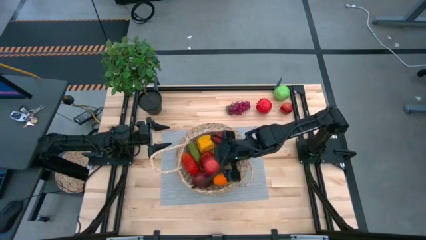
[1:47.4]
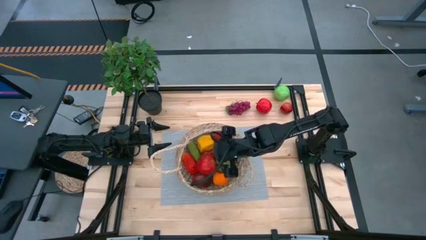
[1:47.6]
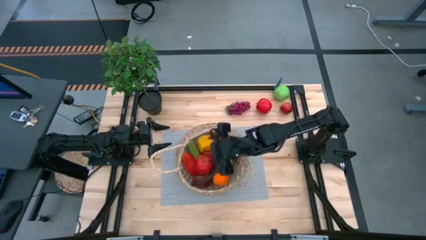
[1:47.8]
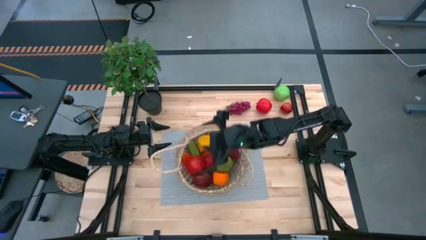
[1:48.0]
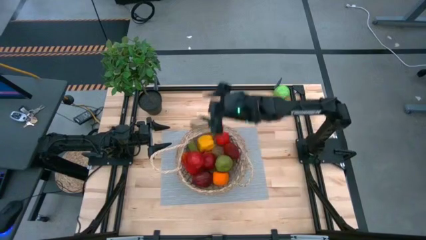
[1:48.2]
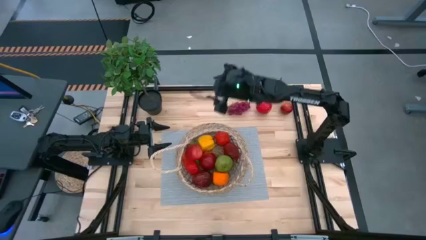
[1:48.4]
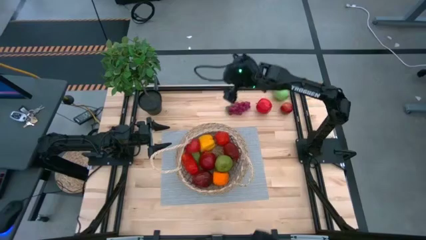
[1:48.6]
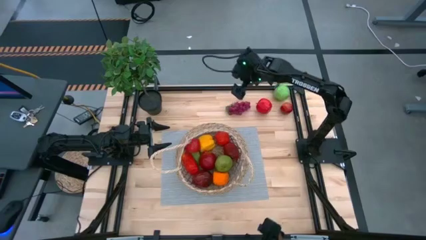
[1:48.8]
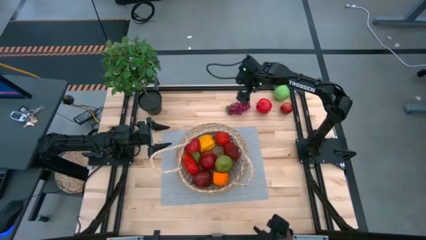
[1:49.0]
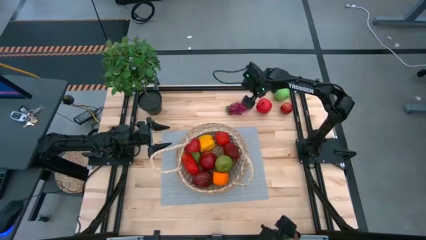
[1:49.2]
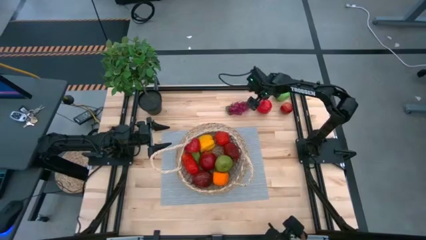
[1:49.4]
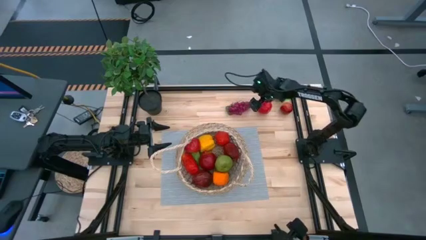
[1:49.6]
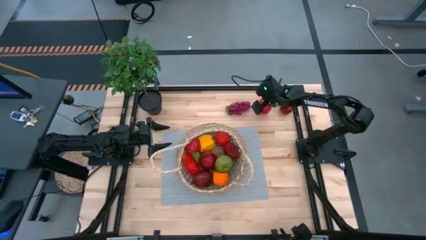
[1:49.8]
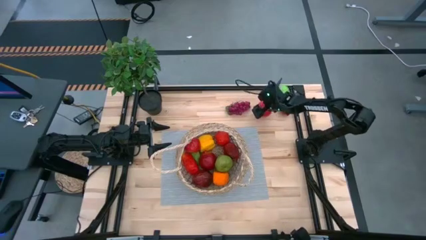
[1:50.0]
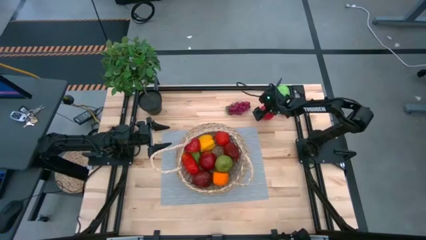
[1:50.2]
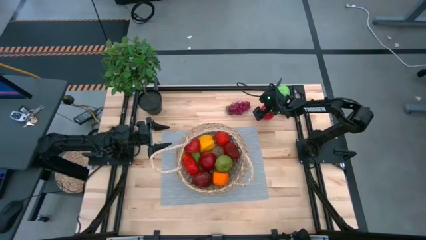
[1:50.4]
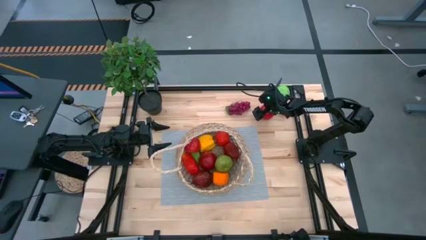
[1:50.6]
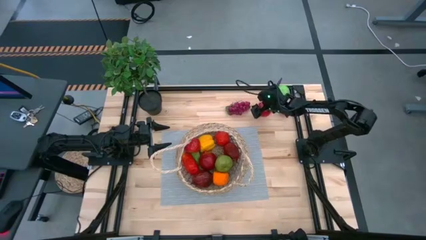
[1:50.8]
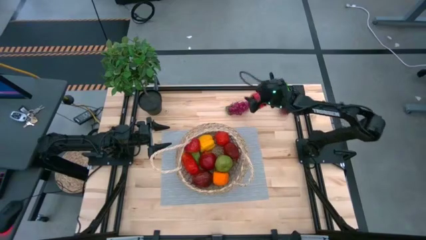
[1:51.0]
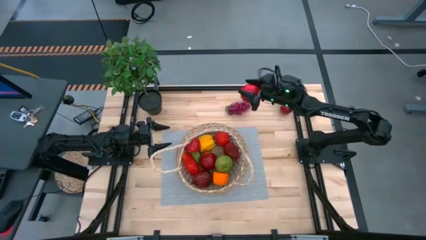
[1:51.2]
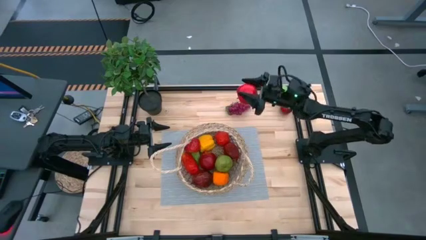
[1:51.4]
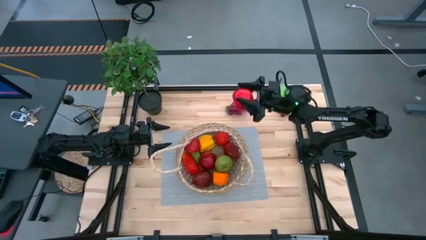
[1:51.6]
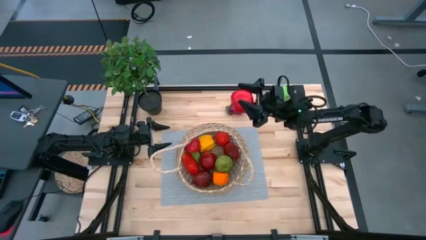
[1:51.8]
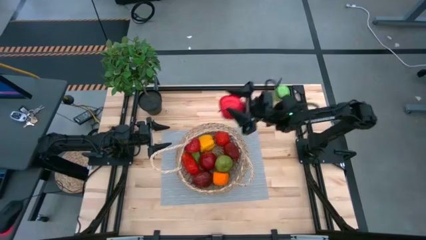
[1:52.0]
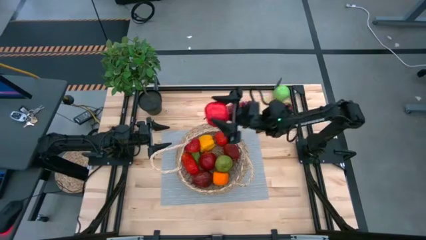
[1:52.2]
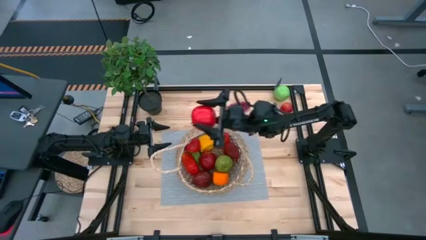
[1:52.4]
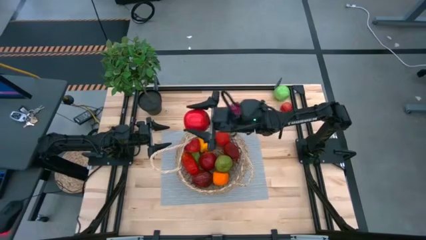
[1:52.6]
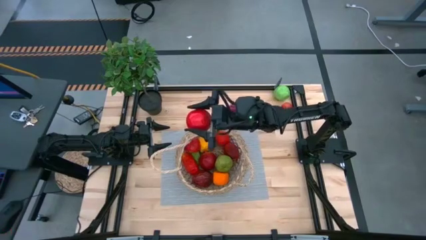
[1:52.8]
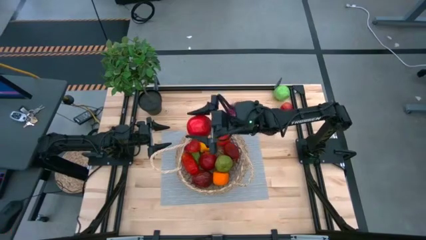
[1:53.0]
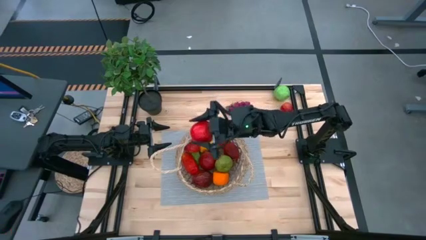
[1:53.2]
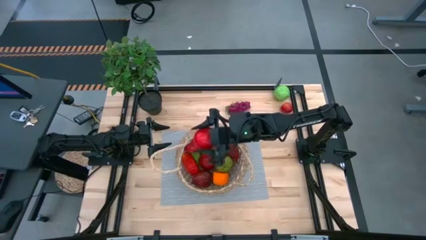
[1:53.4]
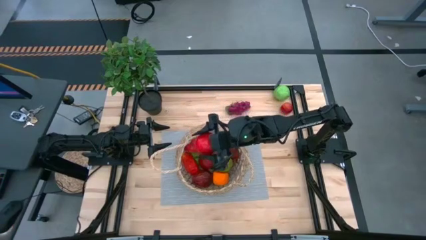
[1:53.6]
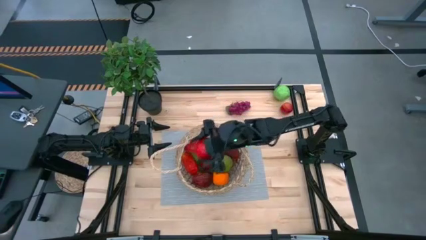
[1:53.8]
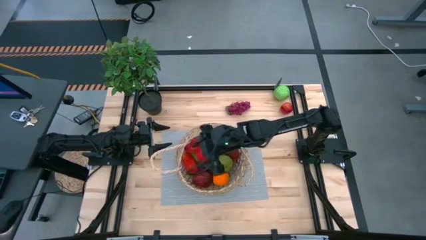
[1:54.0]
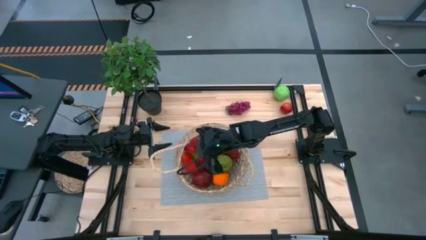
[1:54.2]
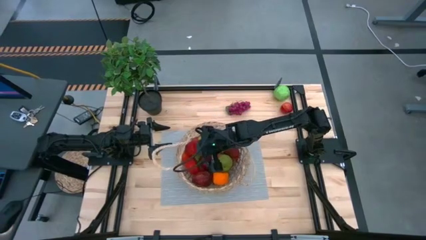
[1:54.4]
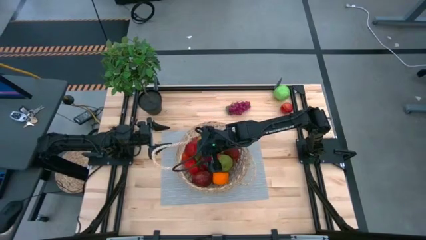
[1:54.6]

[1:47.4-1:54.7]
Task: Build produce basket
Put the left red apple into the basket

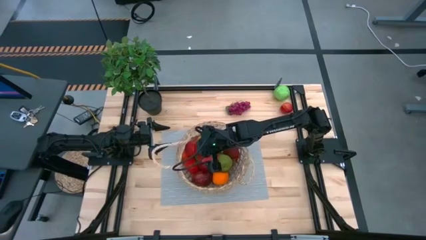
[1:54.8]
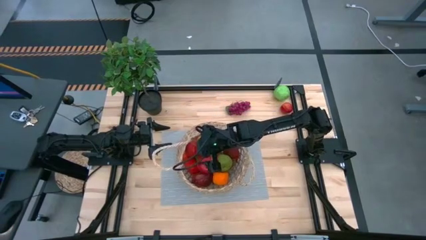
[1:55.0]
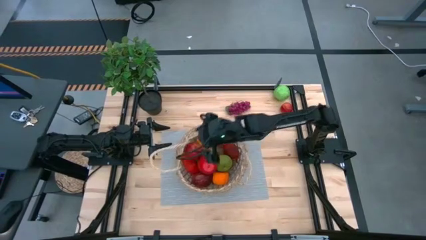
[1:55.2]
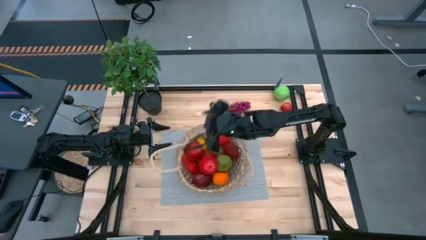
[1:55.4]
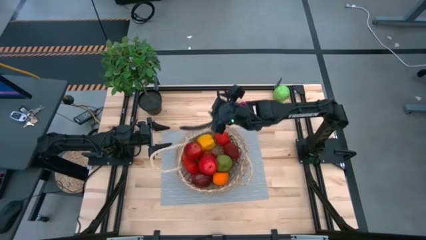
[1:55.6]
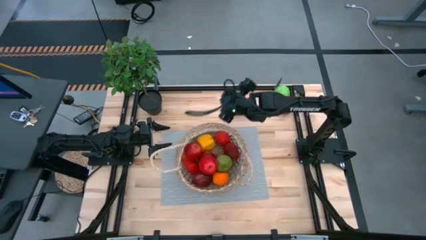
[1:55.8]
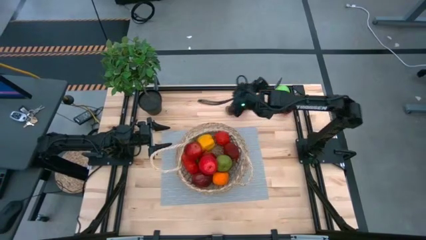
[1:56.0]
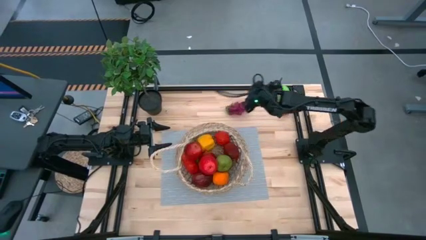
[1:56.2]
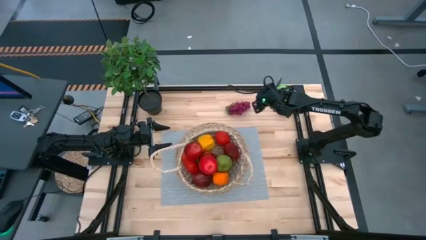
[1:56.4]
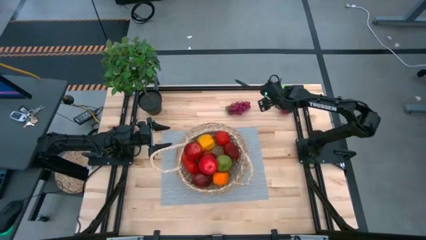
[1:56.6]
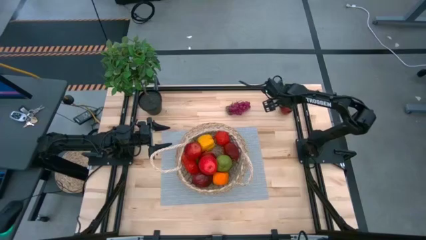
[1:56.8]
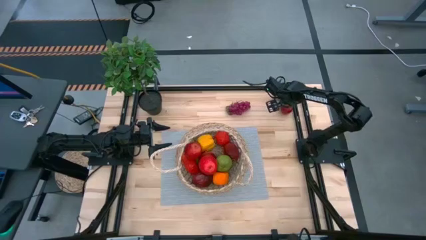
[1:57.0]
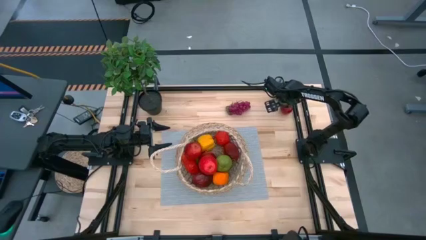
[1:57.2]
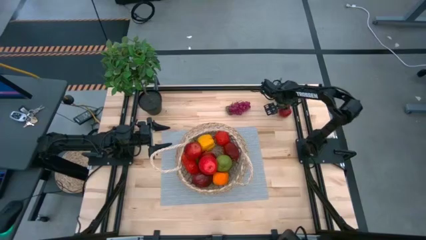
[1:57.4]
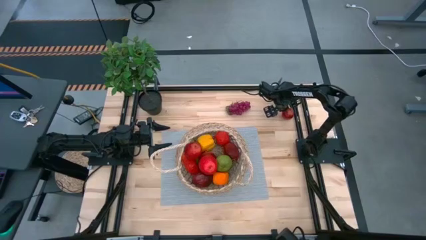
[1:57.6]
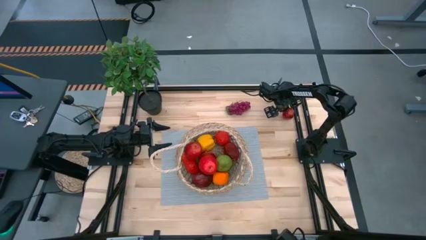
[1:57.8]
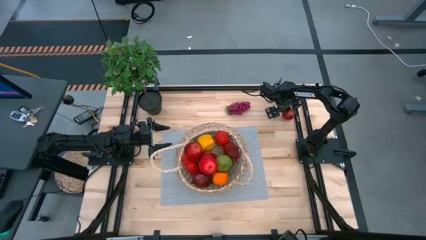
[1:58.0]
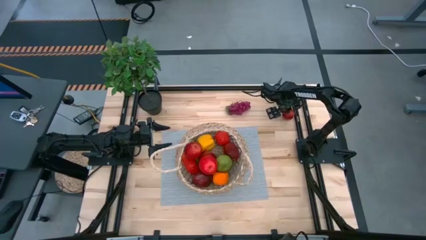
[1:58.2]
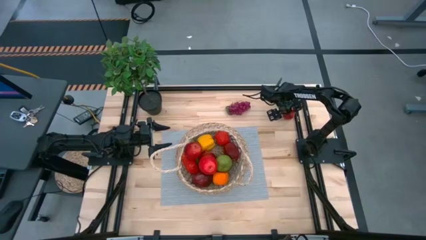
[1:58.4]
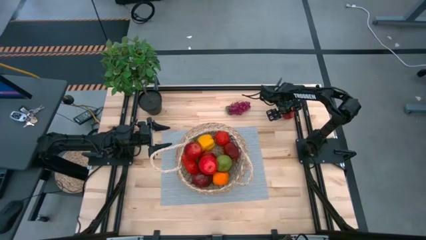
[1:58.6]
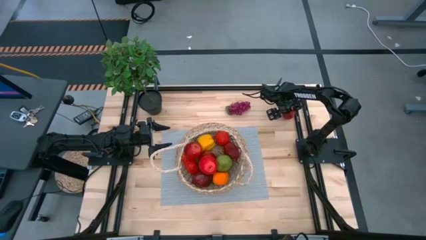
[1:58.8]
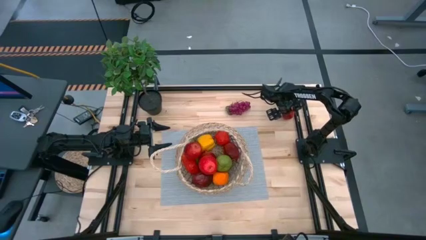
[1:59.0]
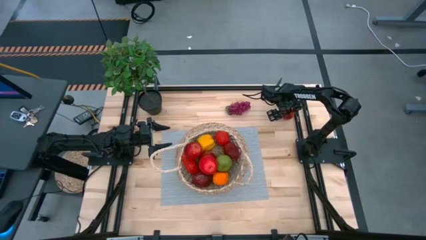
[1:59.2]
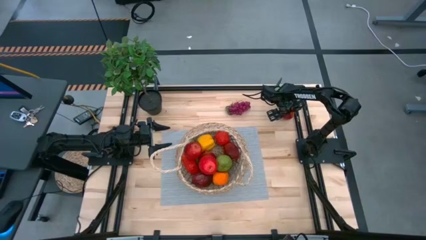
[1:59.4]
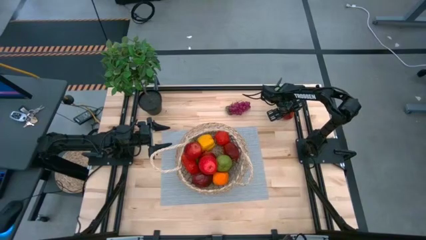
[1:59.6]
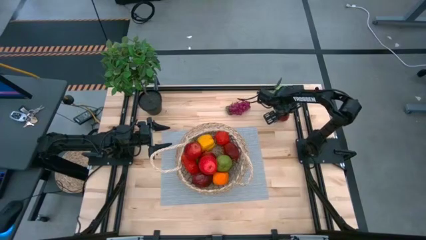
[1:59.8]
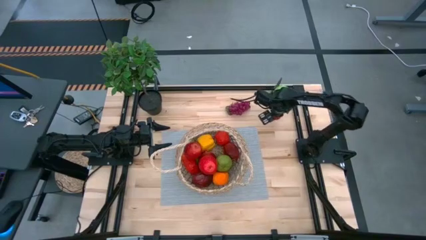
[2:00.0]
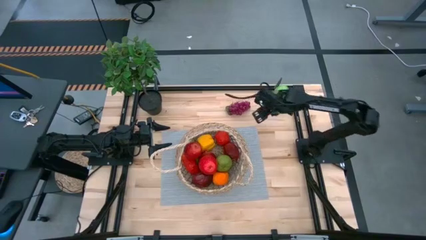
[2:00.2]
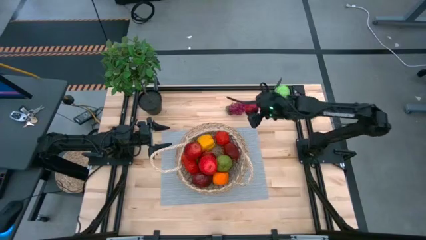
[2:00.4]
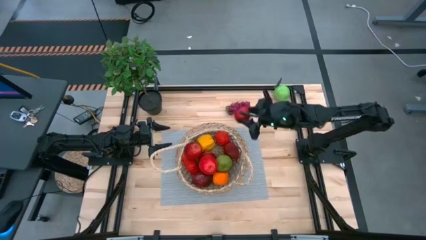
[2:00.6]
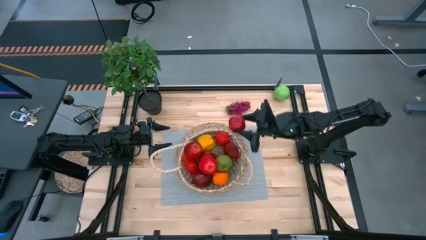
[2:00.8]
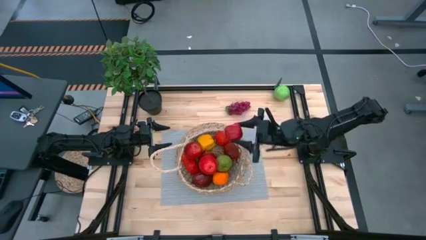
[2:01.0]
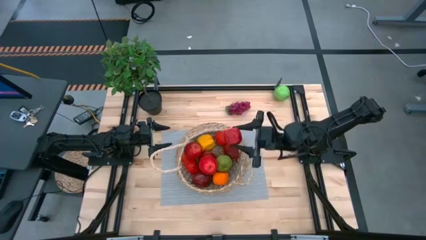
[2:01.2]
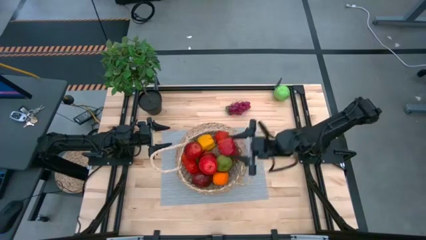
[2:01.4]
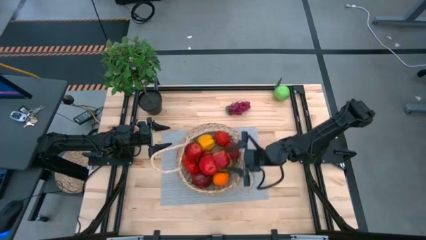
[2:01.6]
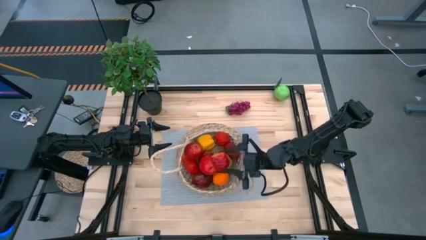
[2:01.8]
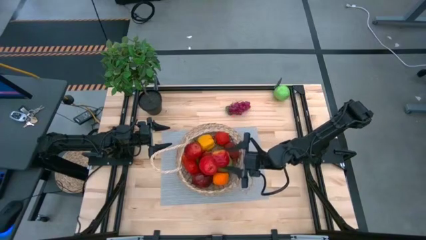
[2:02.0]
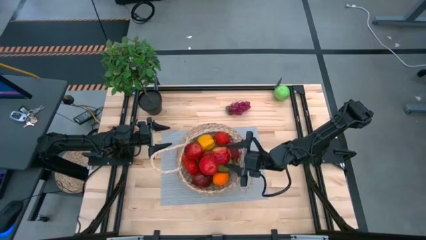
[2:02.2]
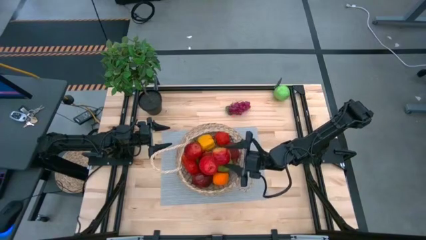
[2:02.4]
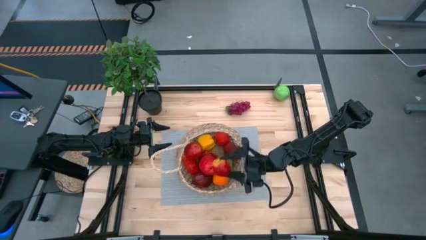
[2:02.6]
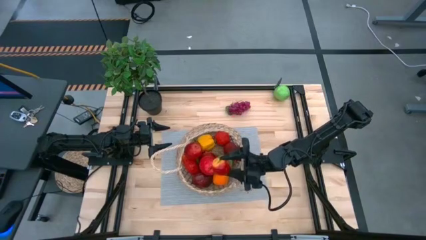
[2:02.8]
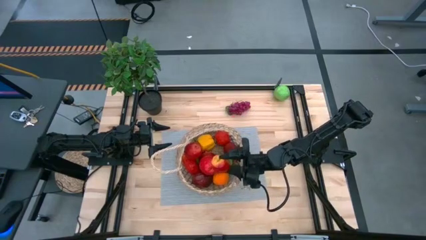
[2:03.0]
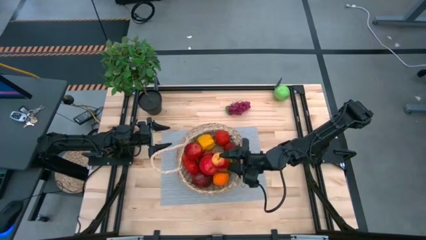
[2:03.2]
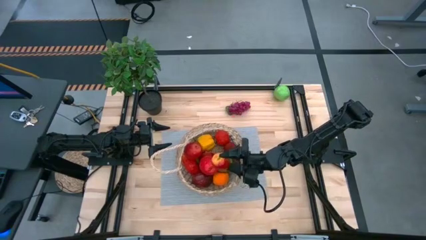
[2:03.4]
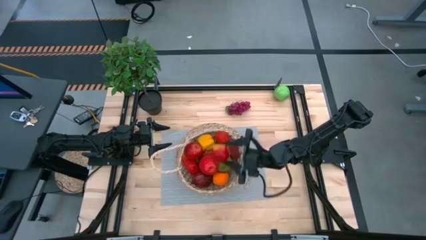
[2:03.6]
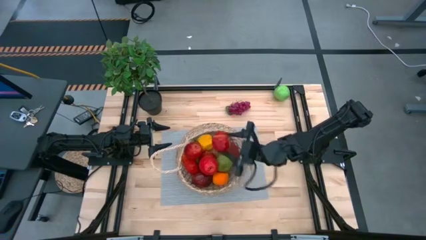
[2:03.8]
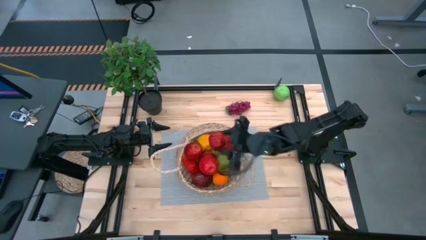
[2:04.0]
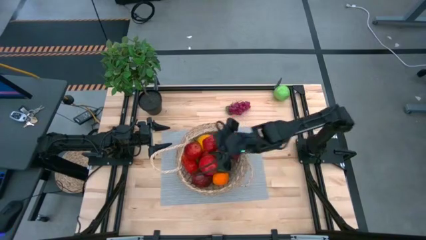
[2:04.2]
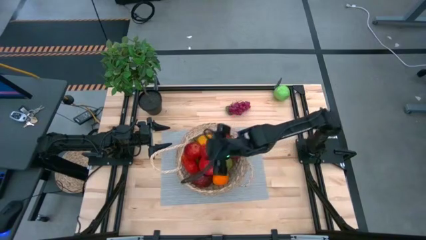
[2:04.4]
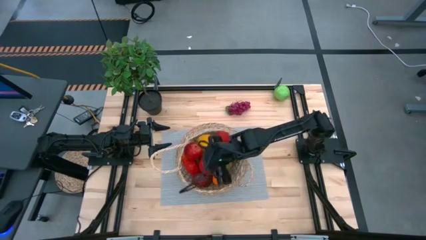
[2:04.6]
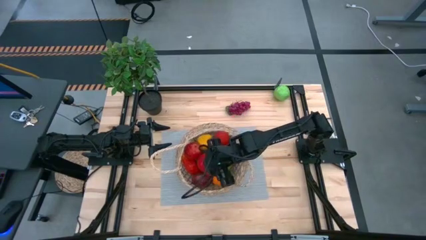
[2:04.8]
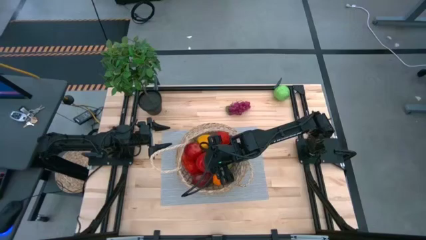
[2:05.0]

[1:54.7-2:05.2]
Put the red apple into the basket
